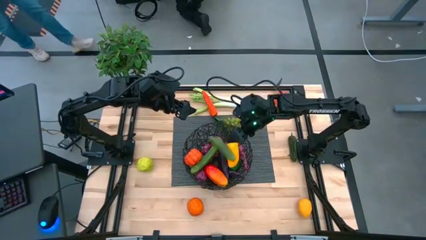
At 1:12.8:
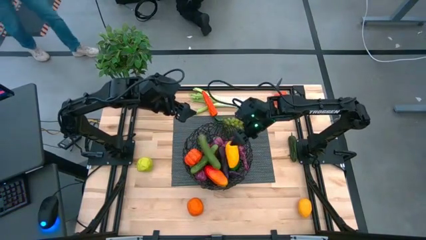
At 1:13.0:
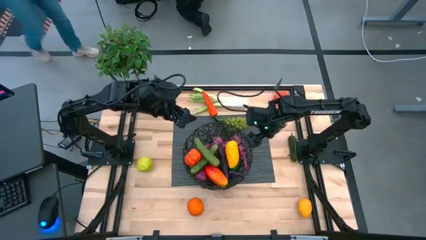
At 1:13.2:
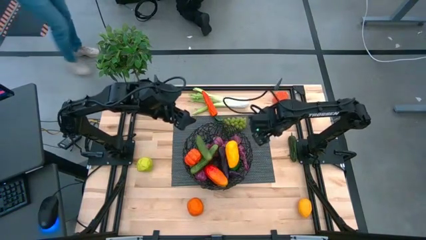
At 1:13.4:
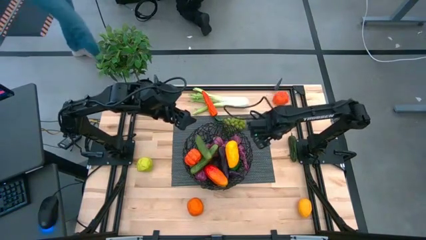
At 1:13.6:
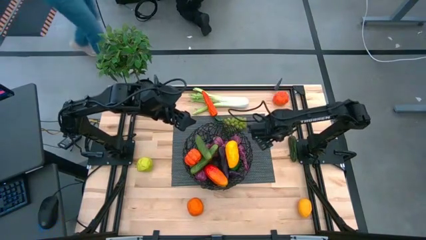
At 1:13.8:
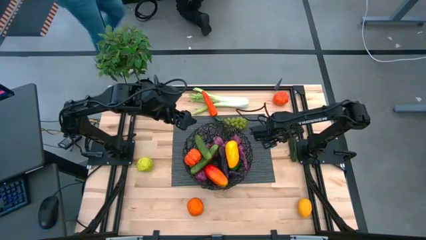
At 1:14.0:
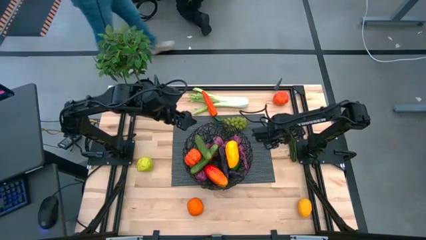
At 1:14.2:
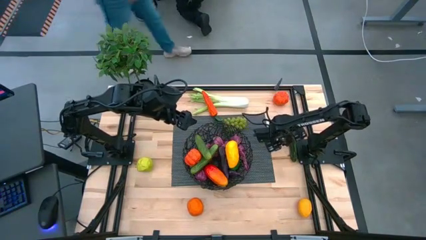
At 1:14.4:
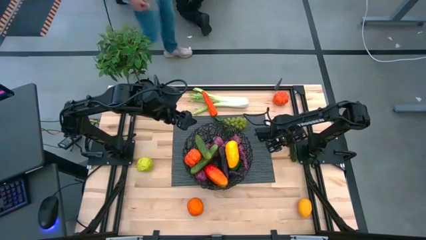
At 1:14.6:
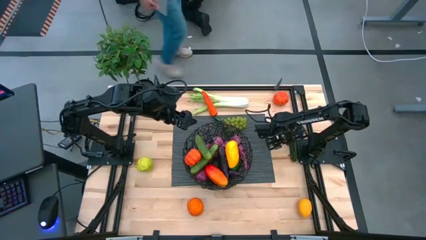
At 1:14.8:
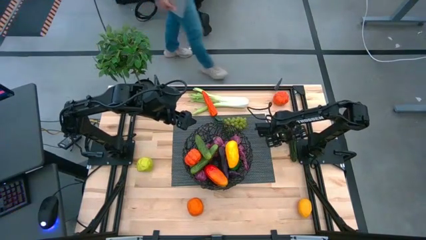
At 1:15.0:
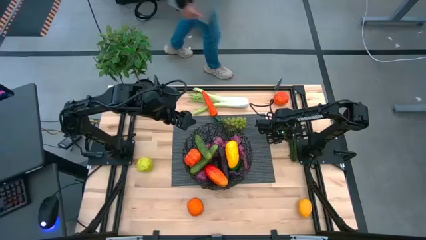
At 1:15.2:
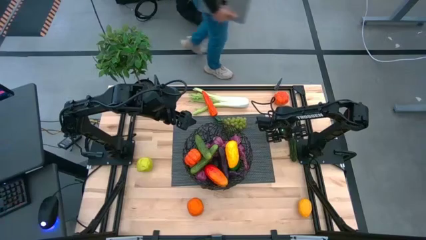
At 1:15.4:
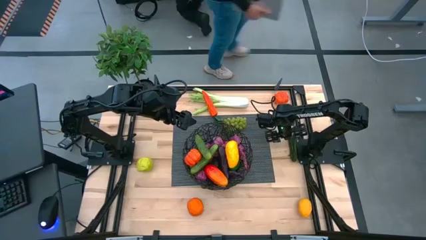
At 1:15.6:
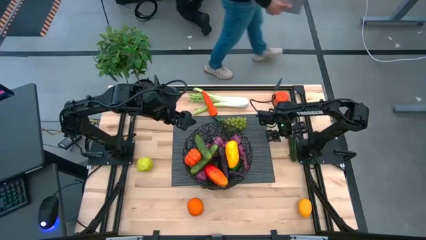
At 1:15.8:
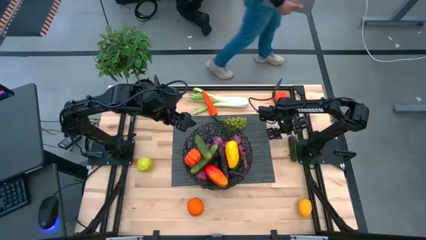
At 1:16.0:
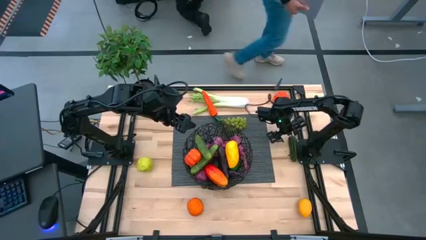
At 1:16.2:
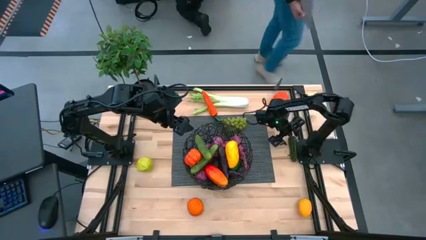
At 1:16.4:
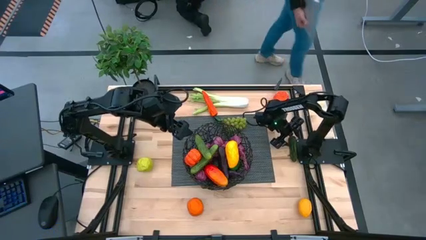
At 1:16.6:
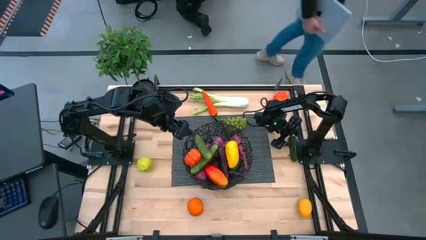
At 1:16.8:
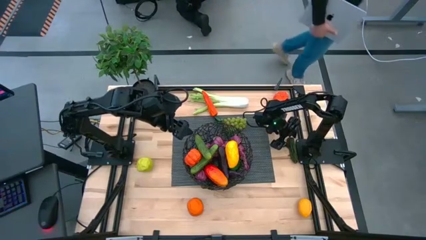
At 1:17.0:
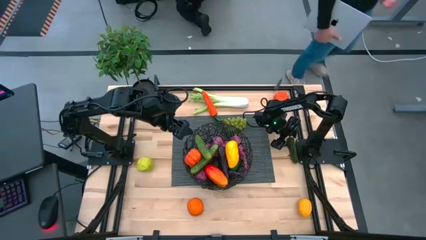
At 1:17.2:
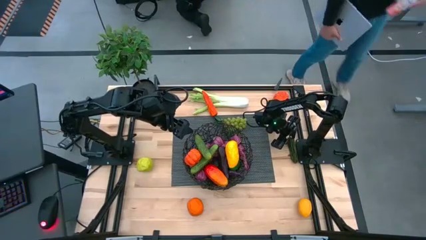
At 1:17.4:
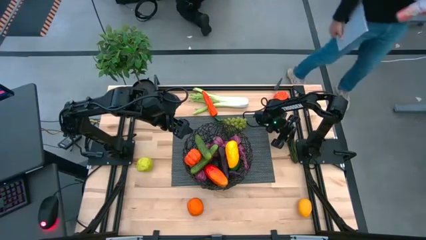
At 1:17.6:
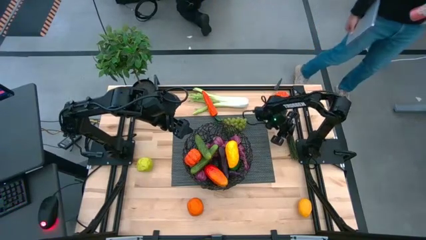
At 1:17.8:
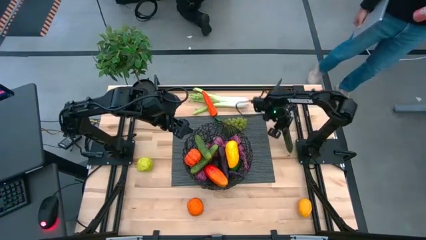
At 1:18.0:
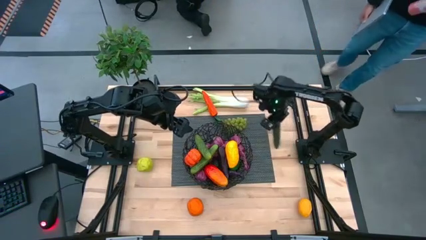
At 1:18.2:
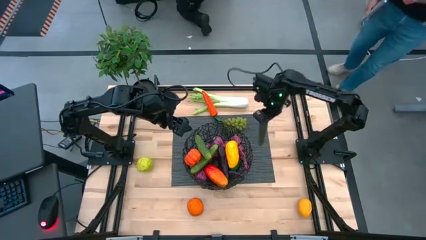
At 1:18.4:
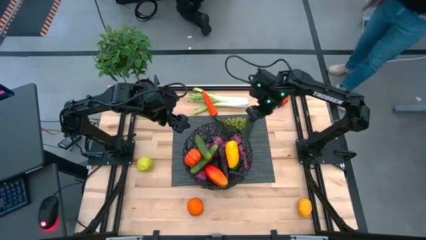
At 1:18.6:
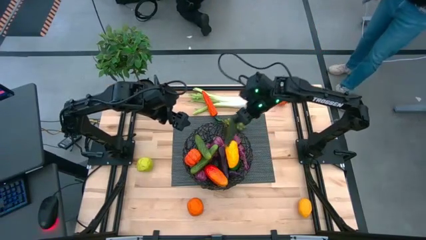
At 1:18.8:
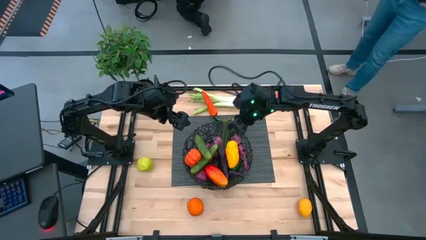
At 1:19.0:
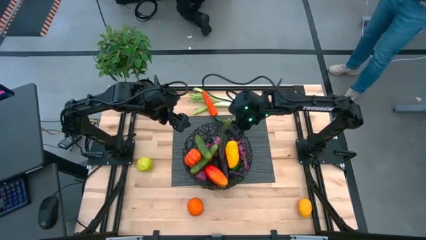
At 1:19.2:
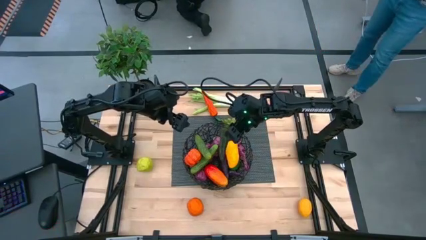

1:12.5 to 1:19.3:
Task: Build produce basket
Put the green chili pepper into the black wire basket

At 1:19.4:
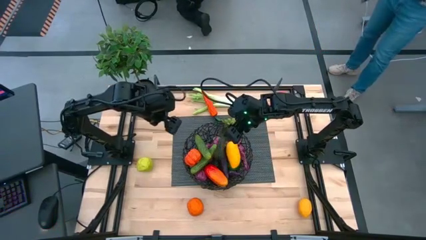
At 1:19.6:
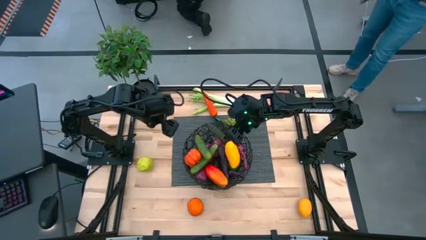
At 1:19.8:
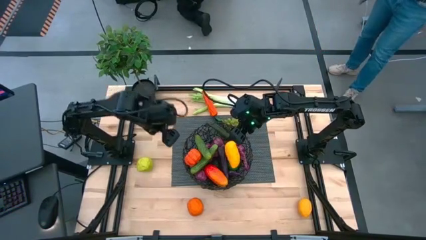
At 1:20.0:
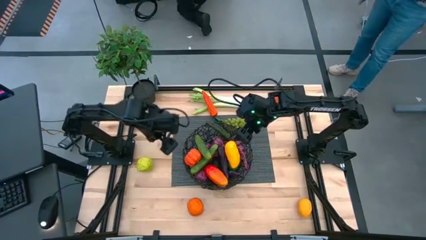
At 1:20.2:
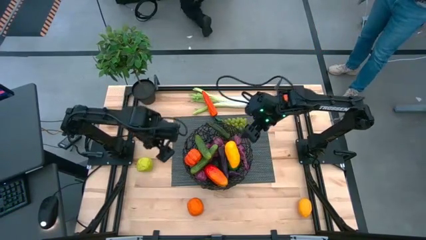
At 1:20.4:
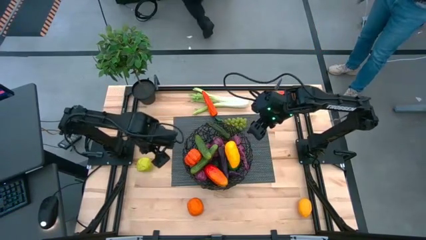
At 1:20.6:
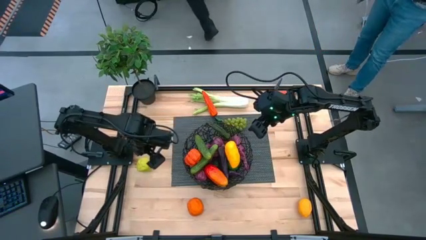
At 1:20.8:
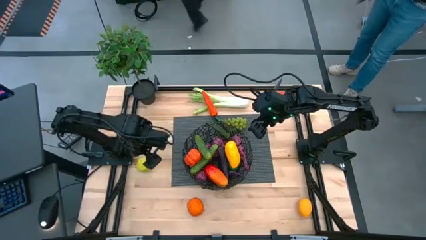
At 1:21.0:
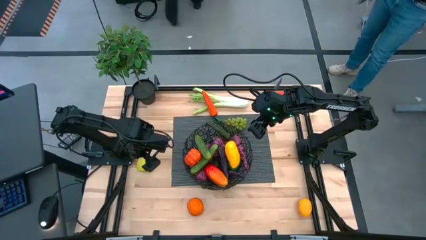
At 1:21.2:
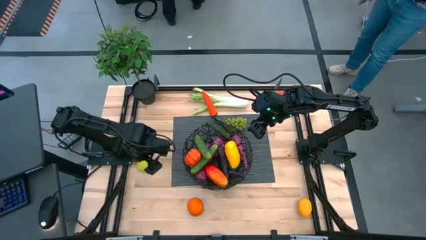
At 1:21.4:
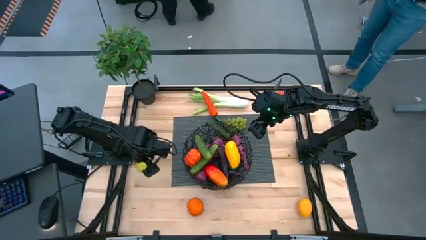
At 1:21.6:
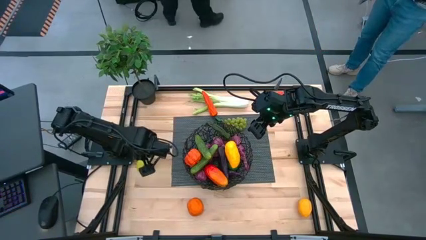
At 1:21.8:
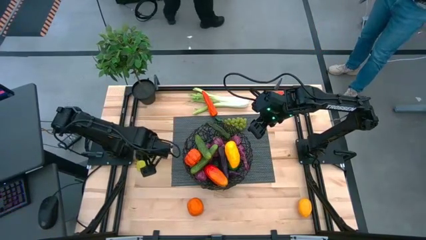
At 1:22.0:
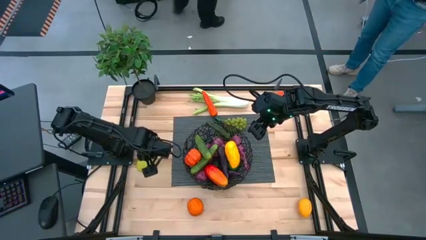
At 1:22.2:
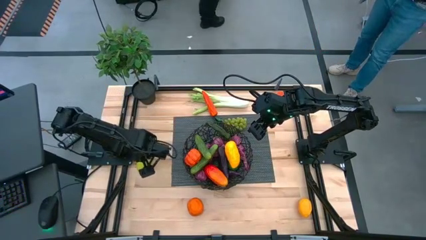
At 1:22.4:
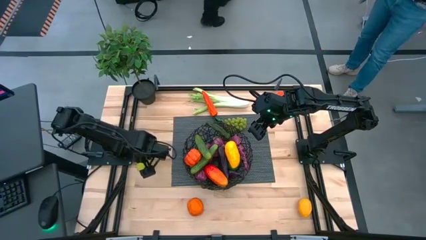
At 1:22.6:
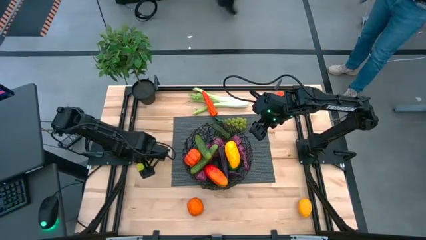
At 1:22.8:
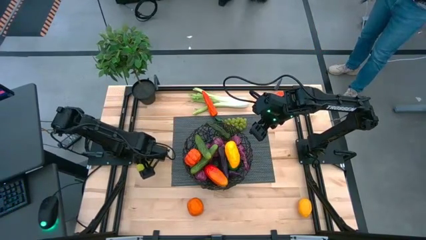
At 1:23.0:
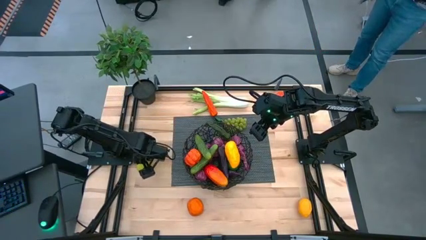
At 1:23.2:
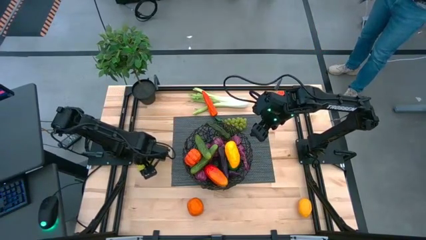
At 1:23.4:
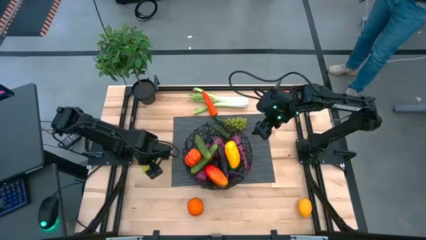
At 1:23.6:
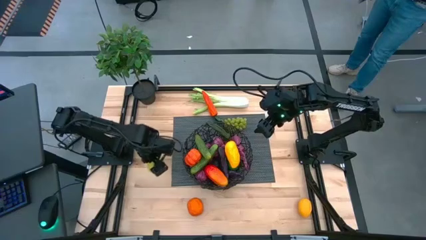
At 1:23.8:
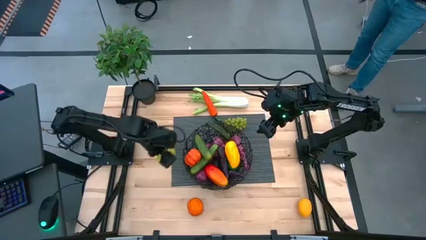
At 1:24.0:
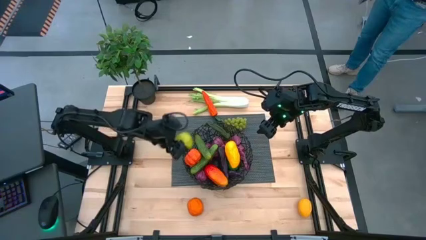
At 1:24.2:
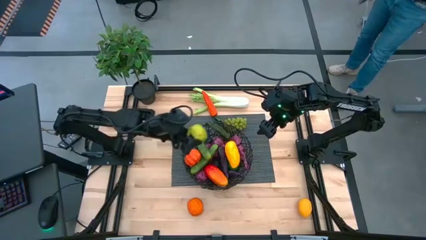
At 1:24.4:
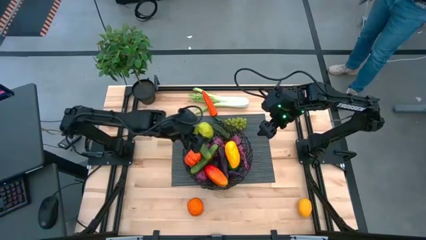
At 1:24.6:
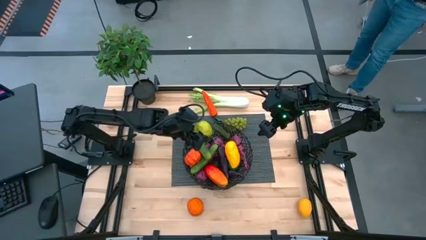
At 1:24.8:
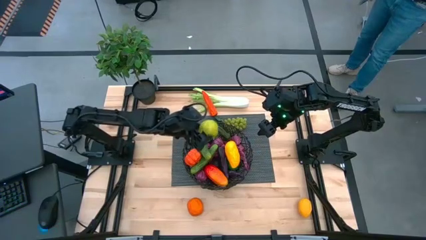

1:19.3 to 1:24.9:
Put the green apple into the black wire basket

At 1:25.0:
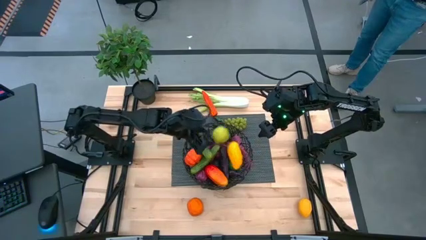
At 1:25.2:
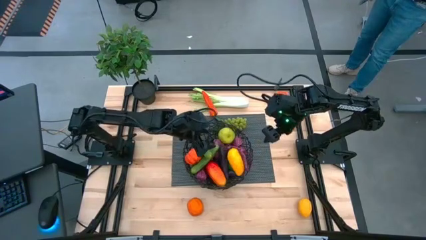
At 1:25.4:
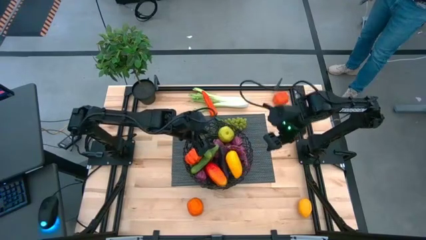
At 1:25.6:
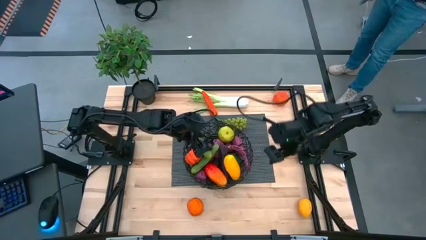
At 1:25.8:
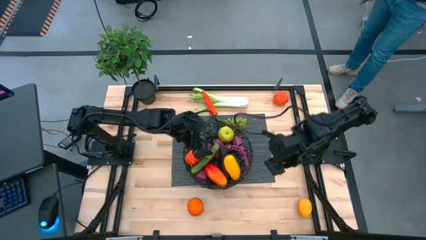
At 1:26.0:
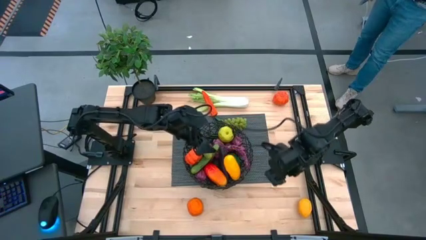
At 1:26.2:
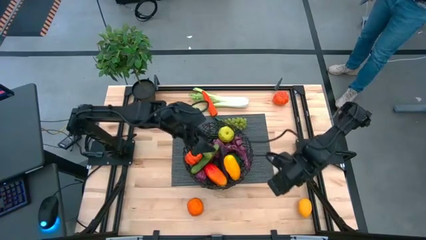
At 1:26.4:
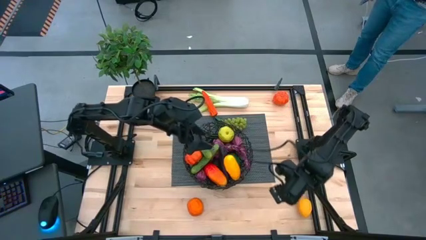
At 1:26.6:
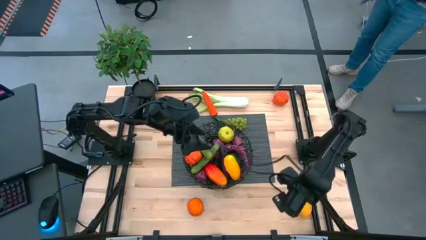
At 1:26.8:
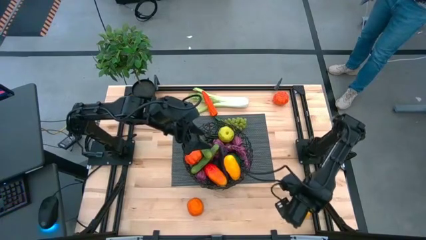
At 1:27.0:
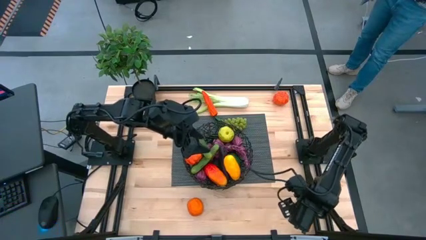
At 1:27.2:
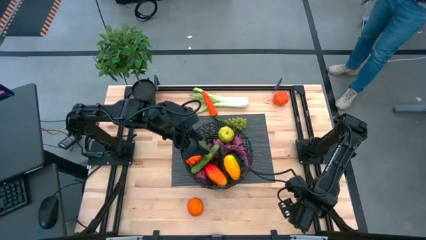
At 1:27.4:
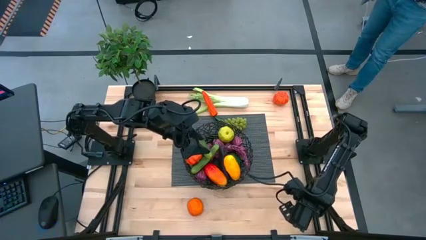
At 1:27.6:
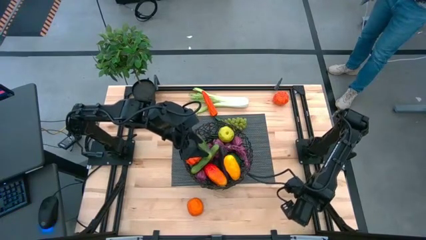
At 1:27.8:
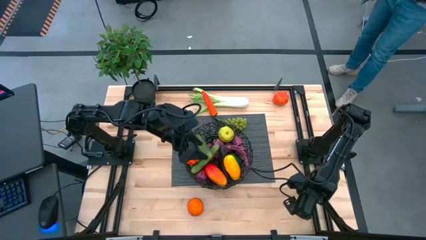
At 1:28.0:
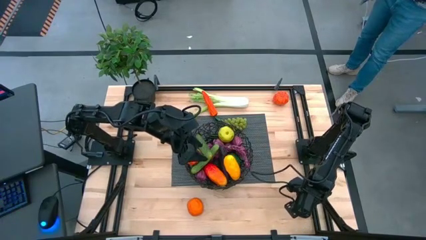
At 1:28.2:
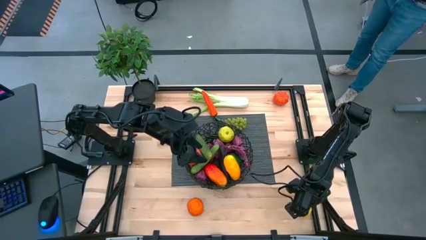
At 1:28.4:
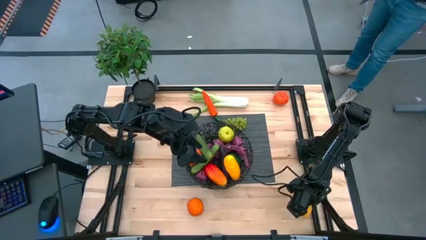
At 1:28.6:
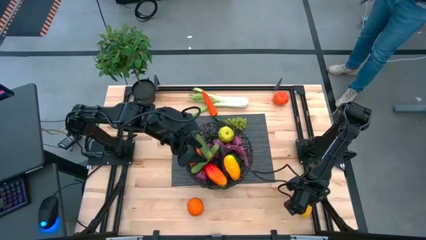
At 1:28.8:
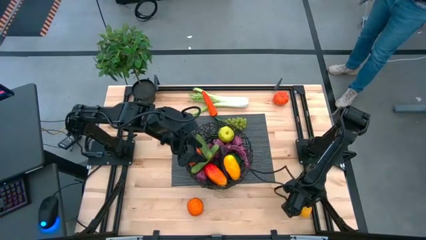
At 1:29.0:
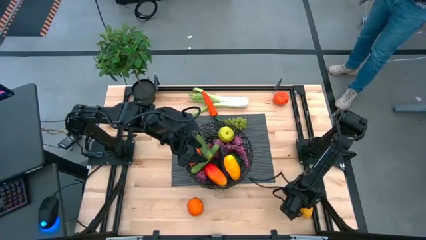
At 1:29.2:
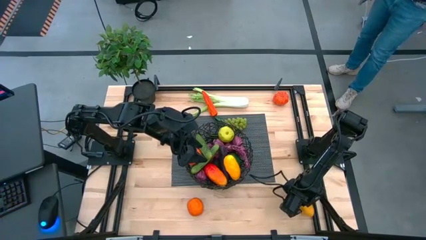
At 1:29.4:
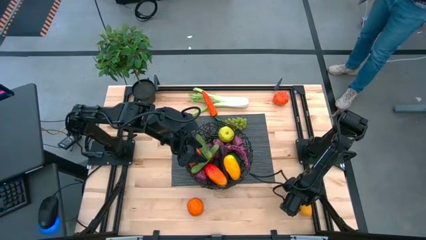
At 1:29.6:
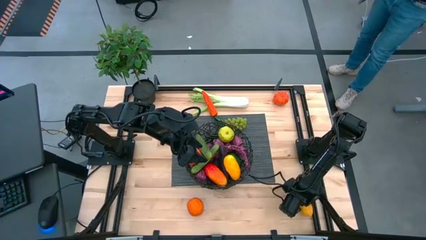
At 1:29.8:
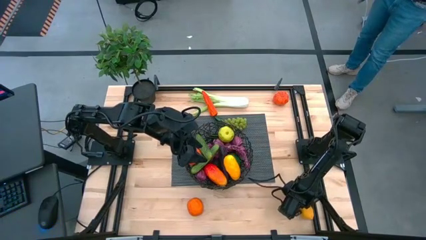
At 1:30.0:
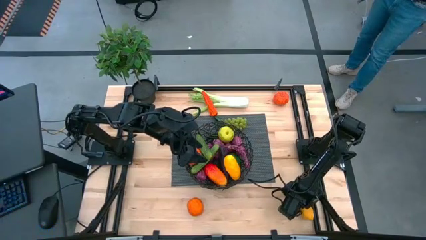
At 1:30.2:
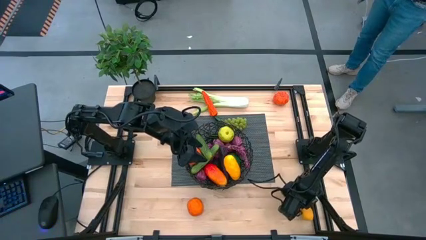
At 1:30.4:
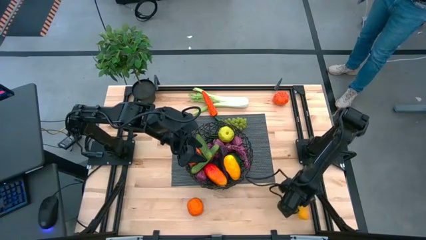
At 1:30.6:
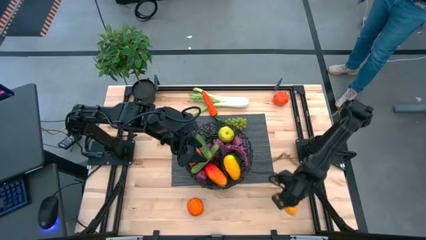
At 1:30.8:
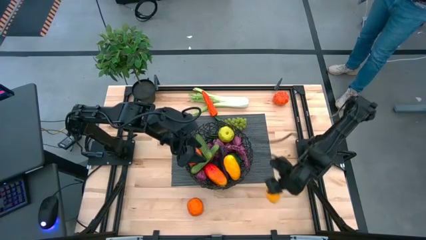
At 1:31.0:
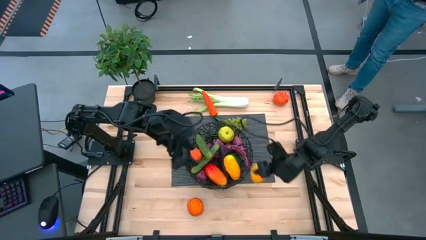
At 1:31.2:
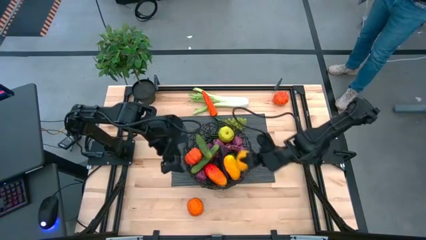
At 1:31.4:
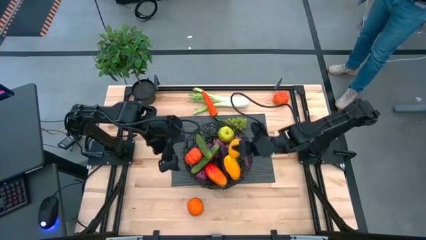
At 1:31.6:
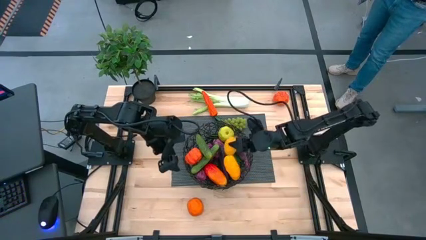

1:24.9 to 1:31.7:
Put the yellow lemon into the black wire basket
